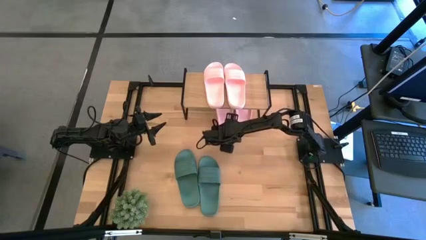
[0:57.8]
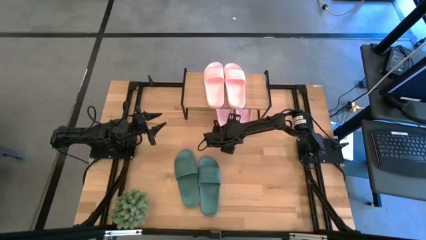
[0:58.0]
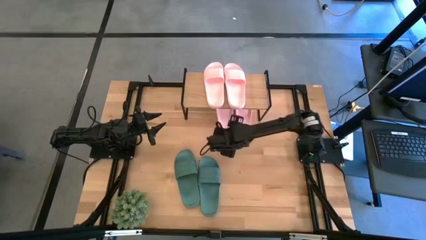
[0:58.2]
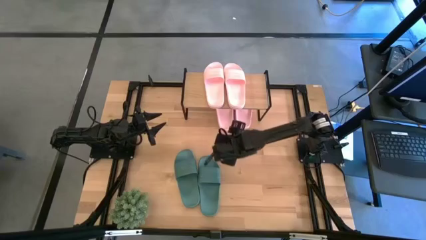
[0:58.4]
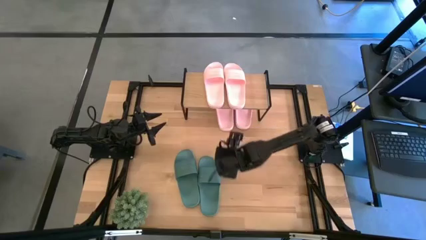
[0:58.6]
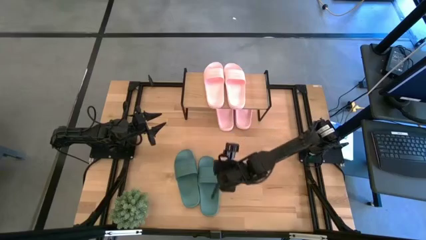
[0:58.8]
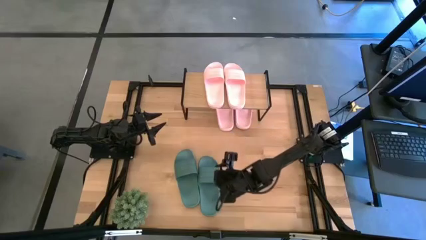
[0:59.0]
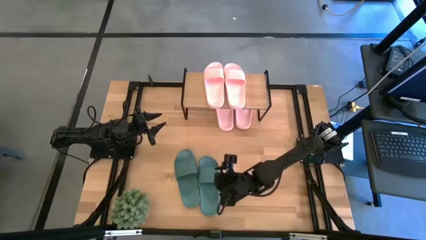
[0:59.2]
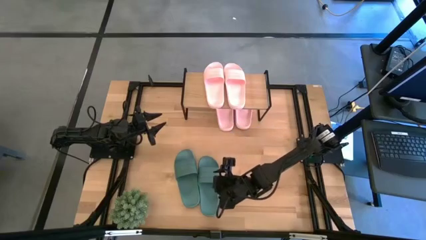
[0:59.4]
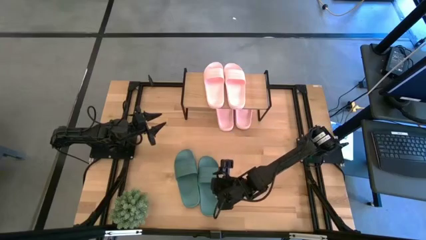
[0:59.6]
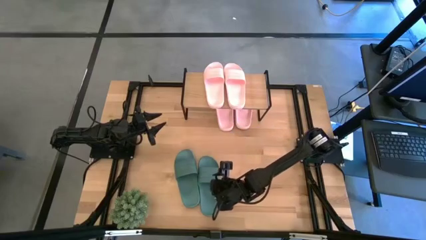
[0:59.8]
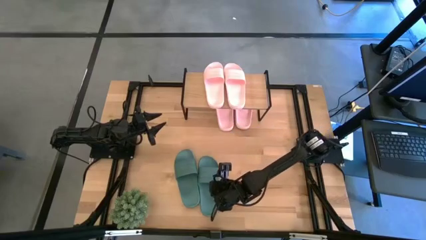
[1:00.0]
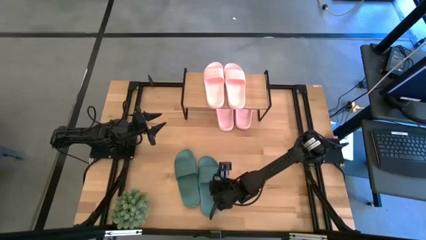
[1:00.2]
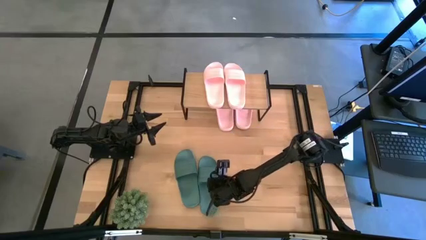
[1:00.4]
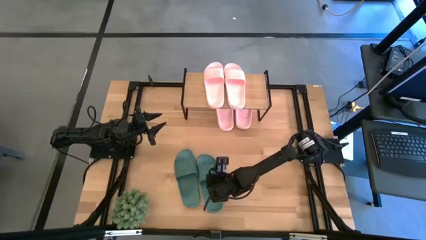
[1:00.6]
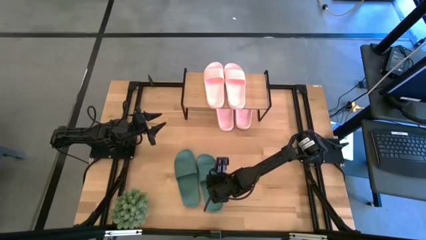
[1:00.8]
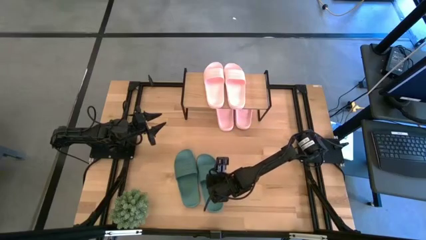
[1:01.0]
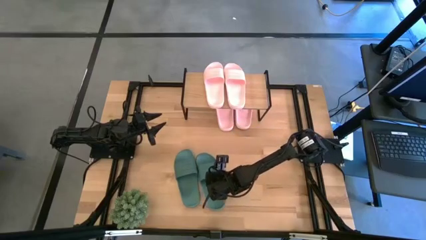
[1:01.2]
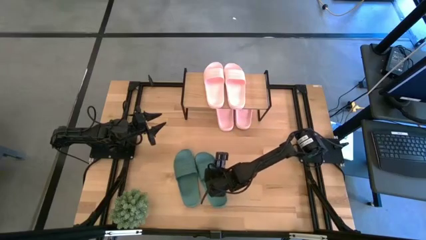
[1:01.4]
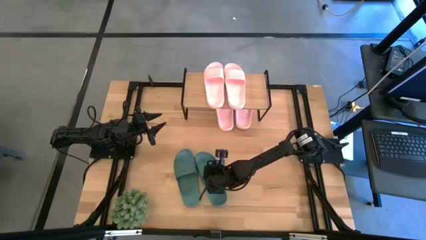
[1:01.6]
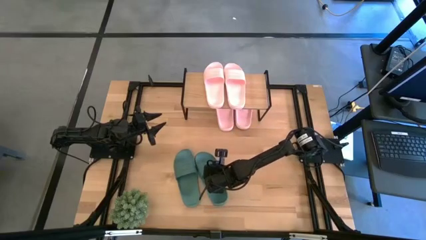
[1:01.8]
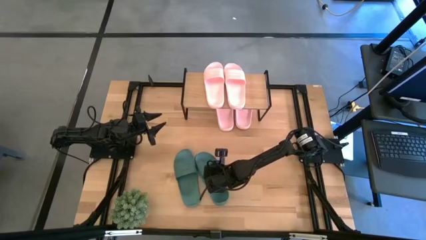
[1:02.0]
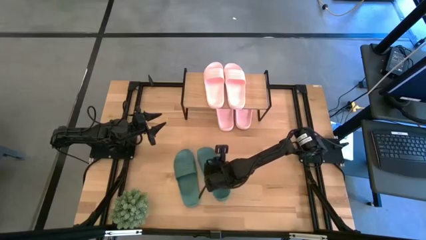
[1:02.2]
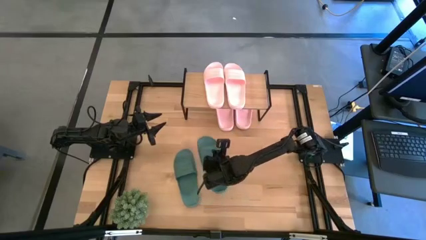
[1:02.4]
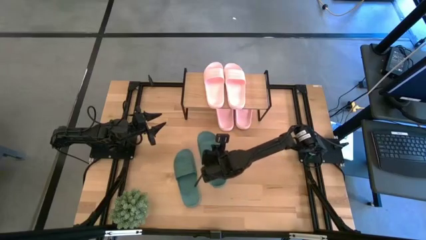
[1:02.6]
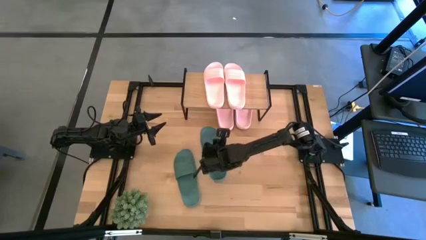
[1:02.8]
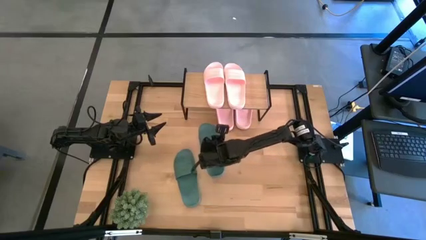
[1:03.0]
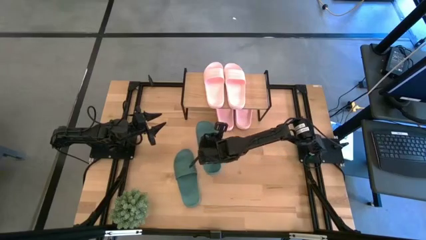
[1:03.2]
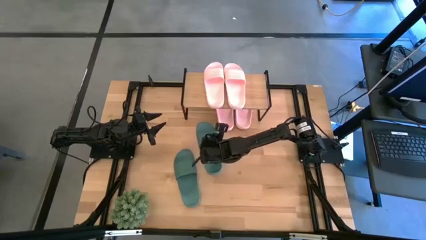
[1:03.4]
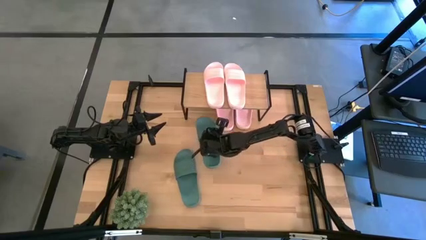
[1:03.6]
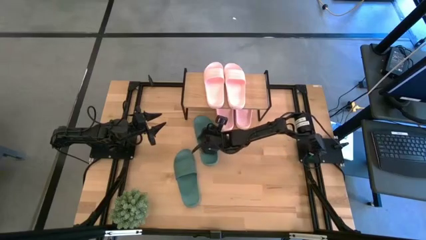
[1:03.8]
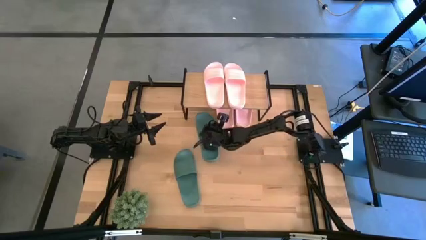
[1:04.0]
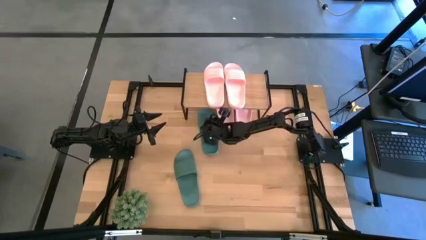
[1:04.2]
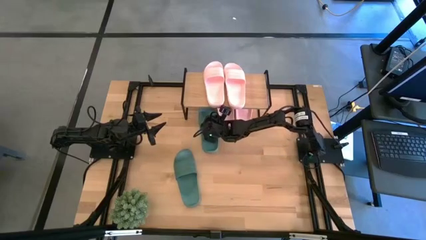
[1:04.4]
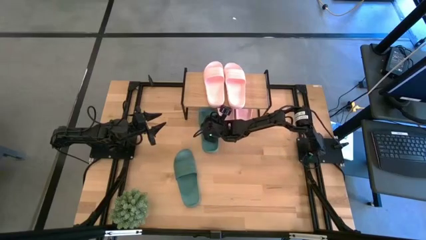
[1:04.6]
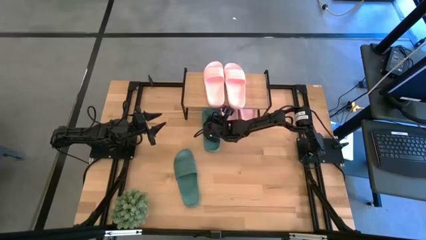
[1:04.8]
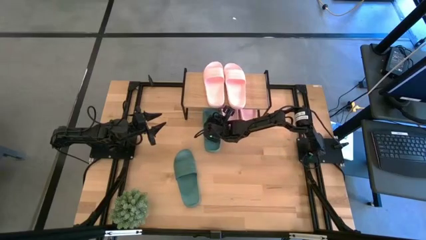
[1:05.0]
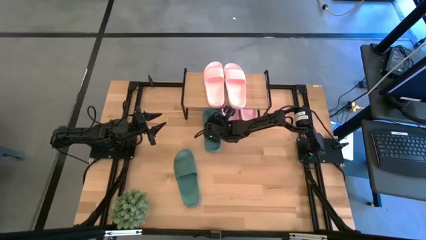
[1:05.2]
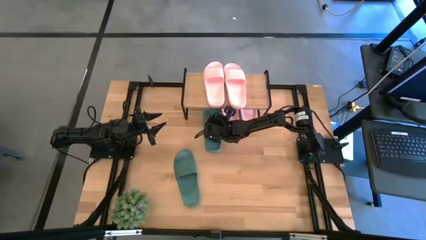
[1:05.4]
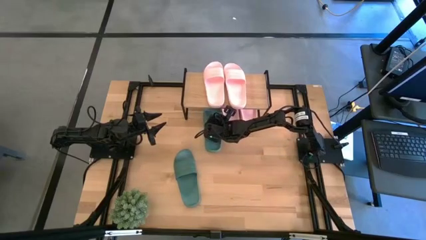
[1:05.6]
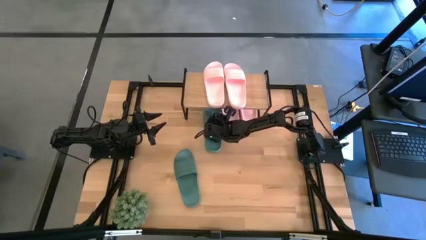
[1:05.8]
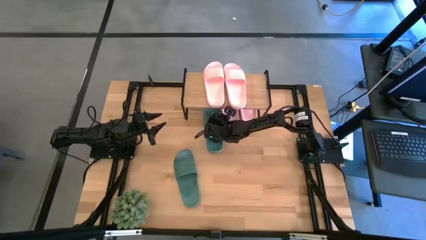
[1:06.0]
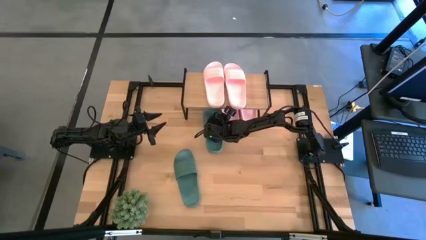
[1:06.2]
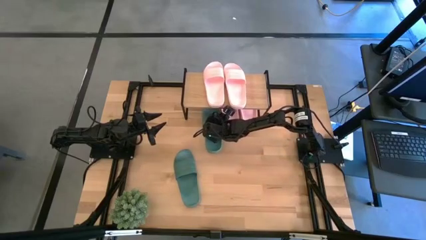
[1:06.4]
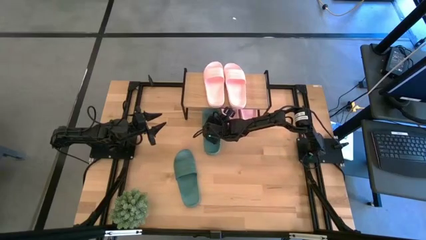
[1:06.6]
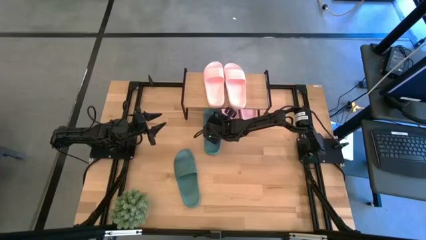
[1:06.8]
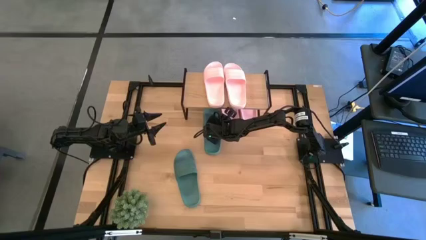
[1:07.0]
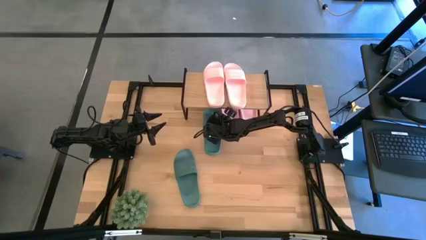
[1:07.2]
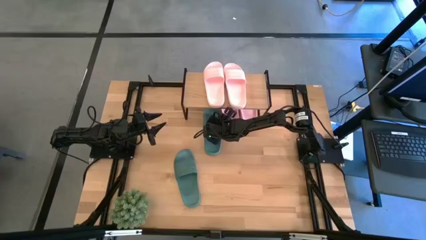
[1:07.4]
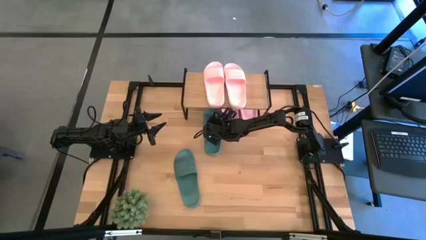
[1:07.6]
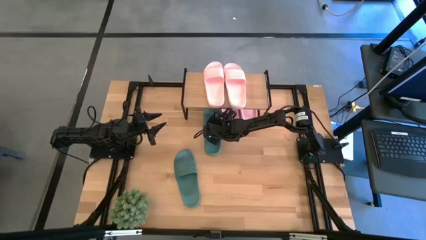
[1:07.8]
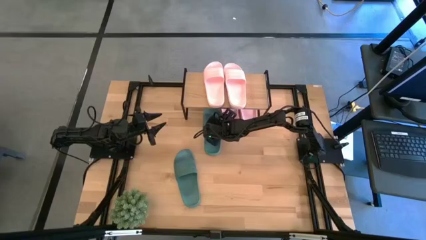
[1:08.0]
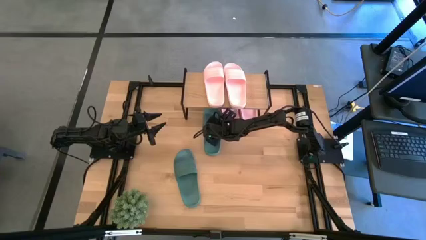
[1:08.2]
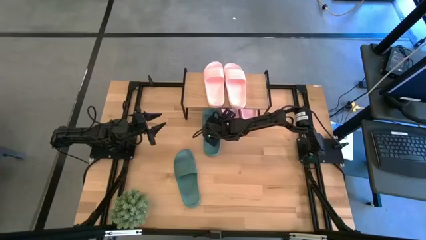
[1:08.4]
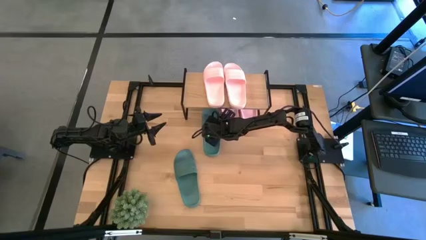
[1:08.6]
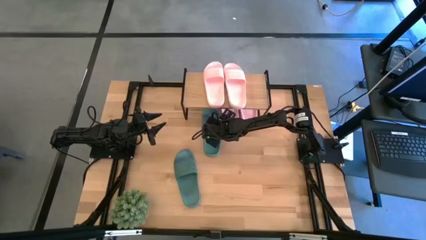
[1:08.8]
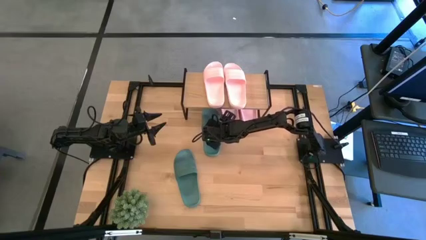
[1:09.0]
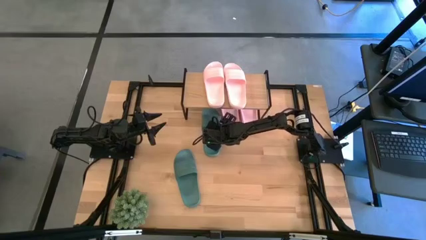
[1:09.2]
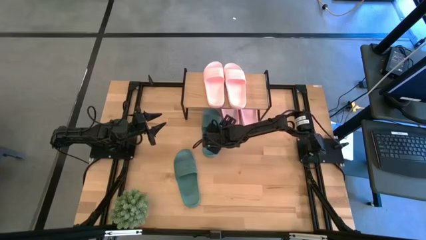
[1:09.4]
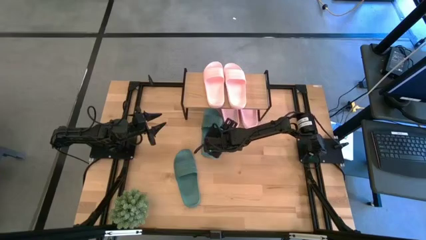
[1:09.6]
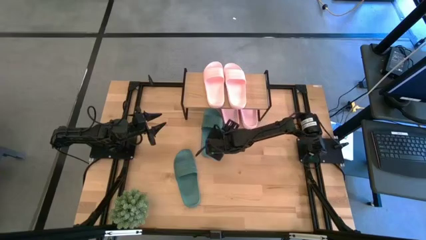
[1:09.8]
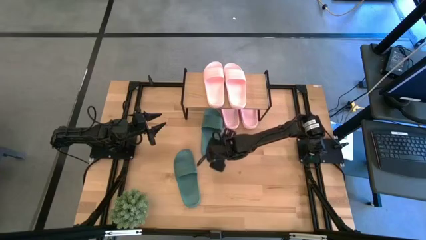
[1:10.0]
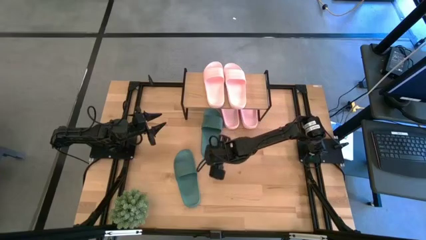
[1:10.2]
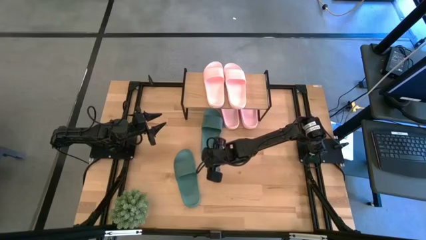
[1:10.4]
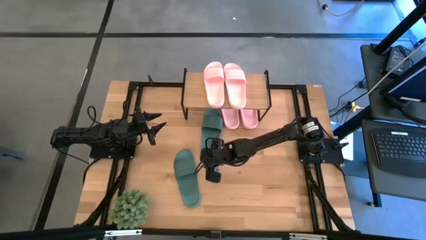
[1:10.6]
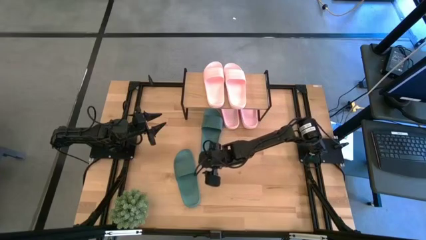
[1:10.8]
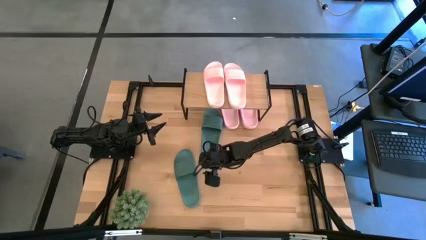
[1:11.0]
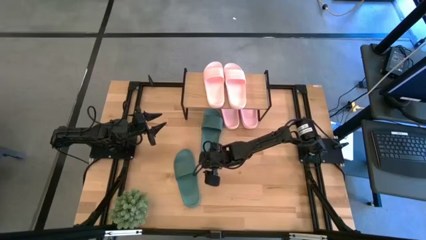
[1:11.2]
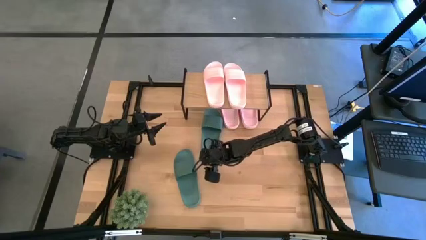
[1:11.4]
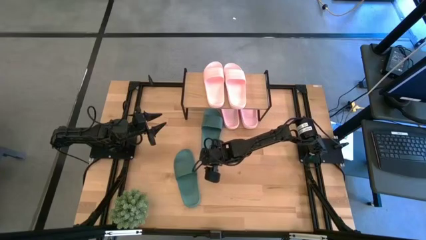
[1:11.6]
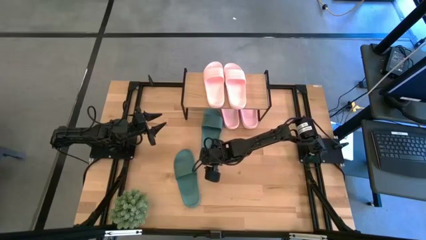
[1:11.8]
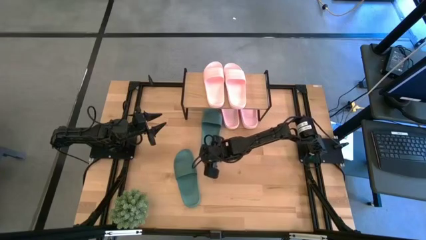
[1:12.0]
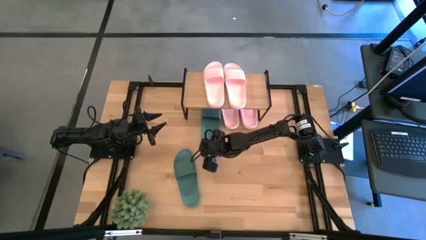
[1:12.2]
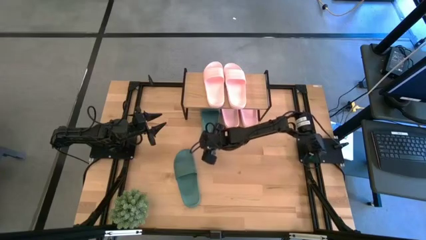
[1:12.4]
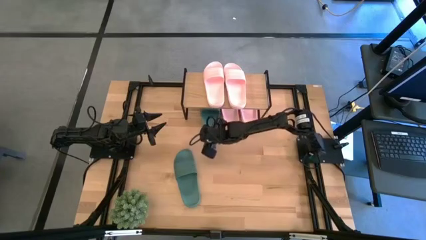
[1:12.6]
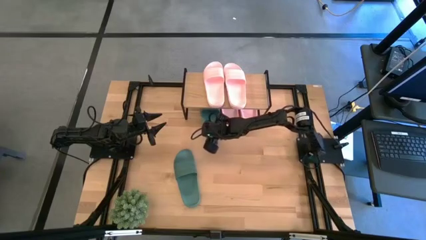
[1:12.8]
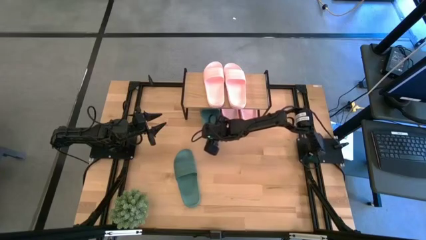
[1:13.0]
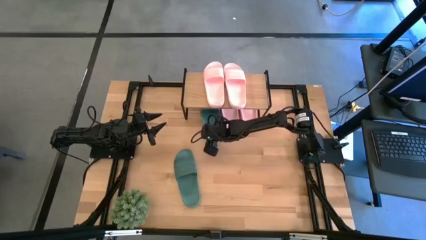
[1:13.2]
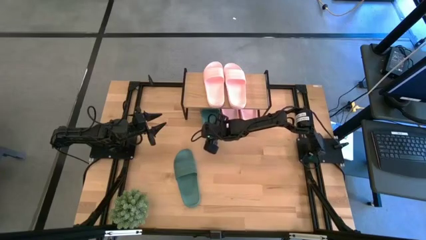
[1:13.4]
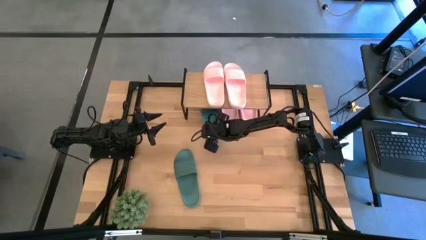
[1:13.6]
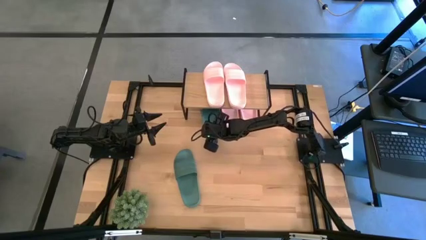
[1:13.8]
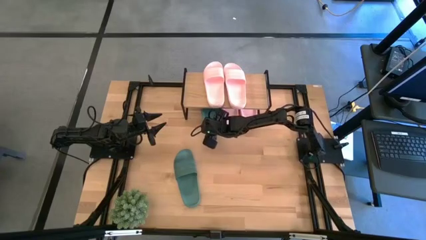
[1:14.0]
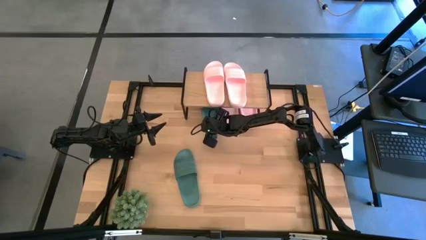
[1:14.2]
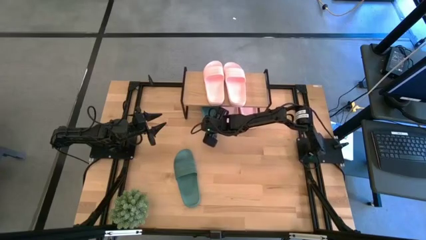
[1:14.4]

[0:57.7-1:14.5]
Task: Pick and place slides into the shelf
Put the green slide under the shelf

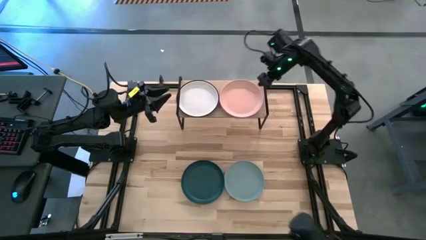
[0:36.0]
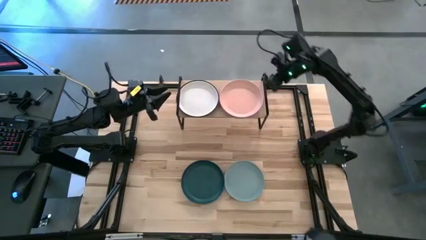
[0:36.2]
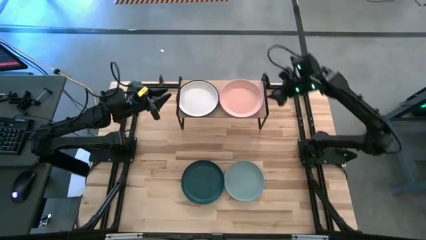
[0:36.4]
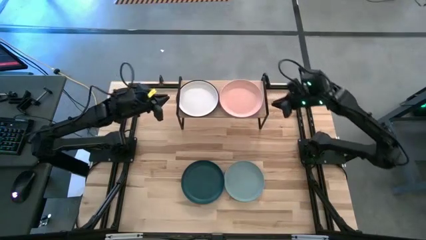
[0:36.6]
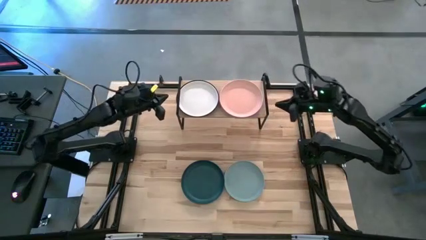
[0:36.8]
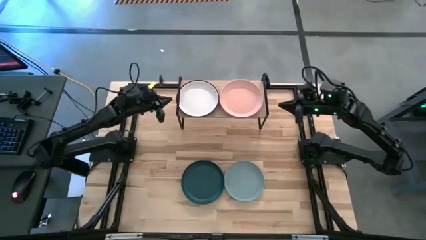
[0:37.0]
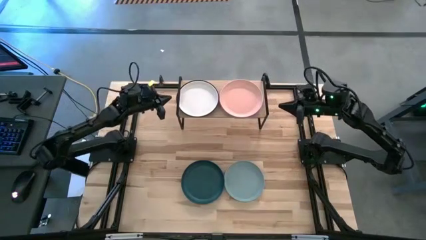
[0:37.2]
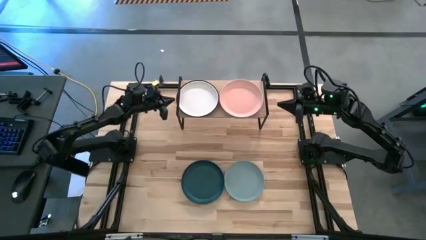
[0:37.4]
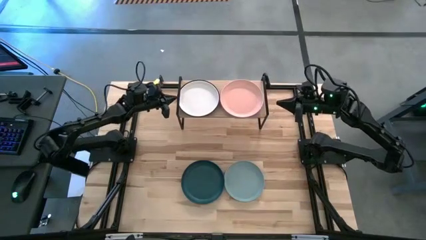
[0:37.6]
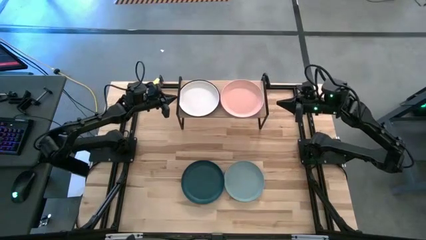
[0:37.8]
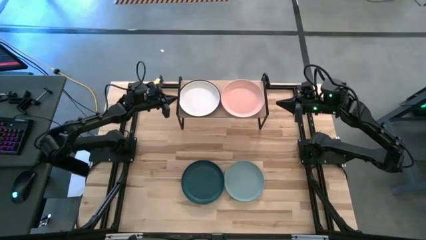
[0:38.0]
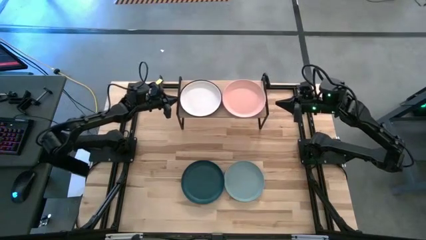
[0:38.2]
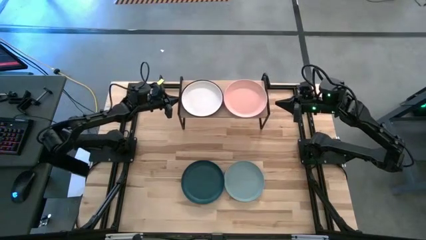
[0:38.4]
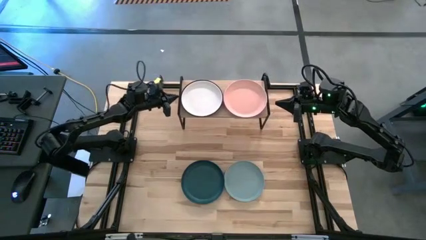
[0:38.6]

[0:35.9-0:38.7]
Task: Place and stack plates onto a shelf
Adjust the colored stacked plates
